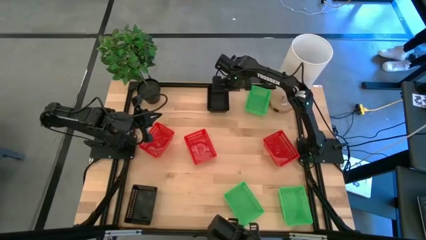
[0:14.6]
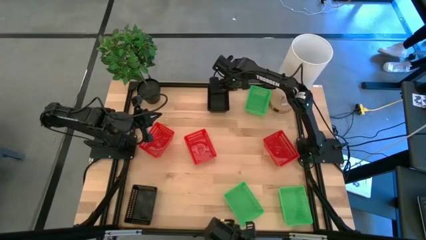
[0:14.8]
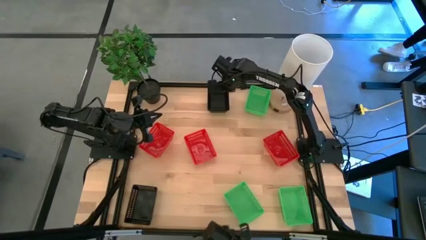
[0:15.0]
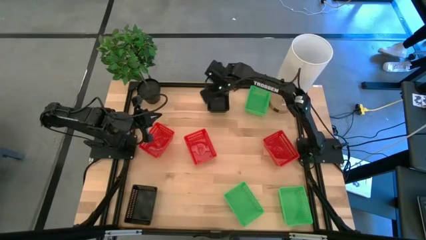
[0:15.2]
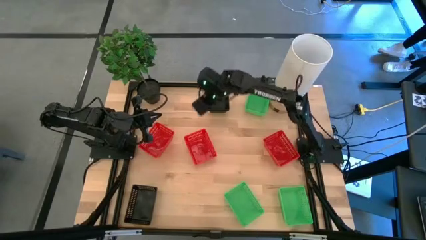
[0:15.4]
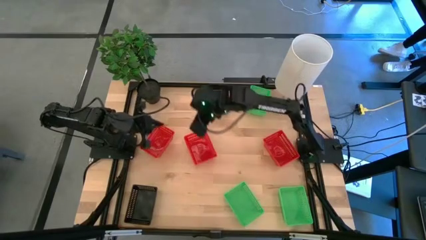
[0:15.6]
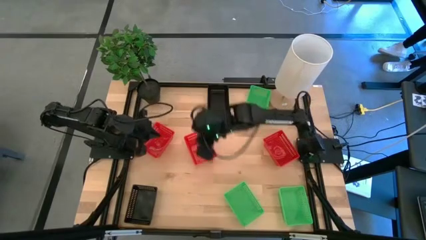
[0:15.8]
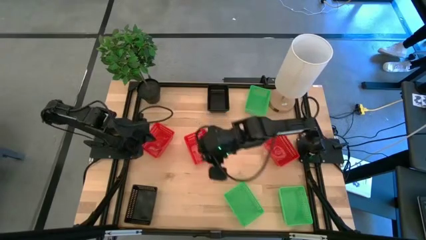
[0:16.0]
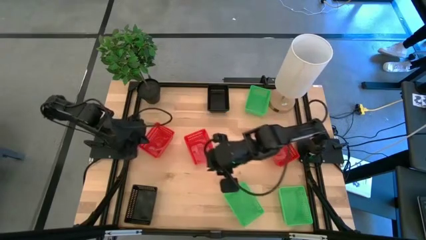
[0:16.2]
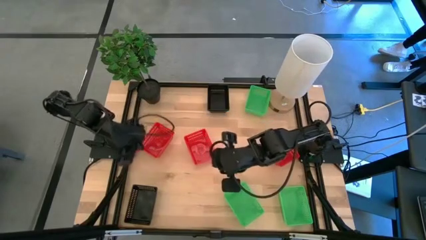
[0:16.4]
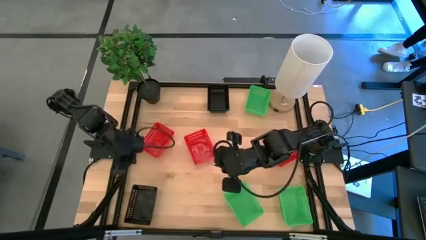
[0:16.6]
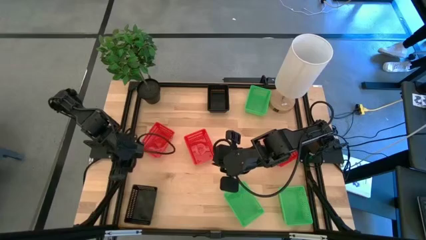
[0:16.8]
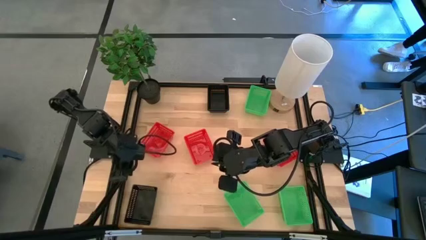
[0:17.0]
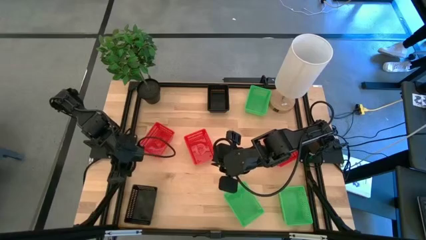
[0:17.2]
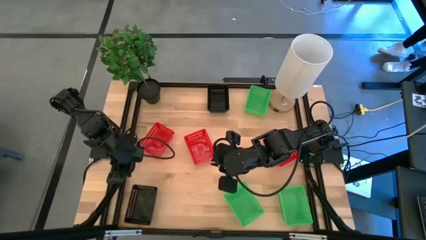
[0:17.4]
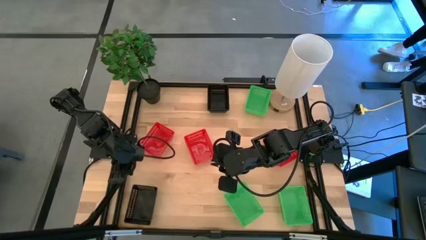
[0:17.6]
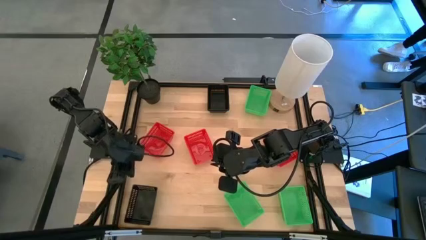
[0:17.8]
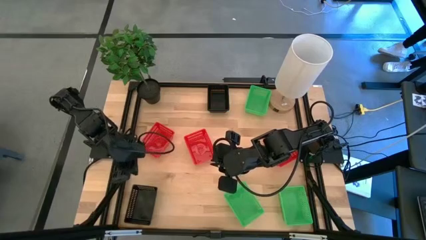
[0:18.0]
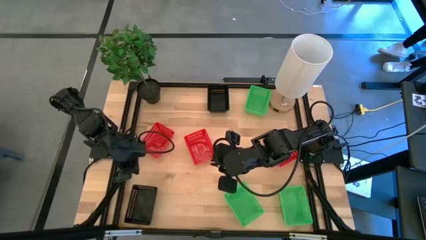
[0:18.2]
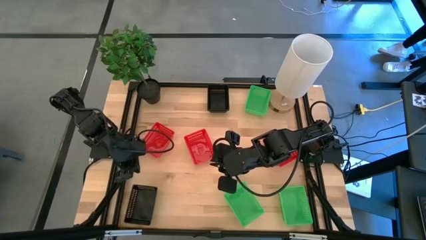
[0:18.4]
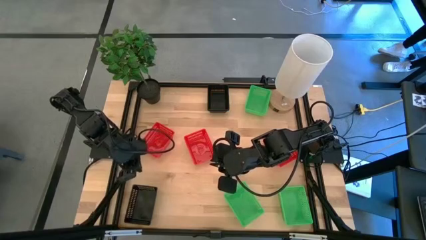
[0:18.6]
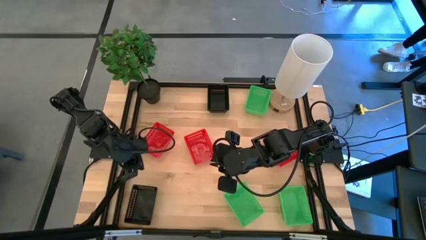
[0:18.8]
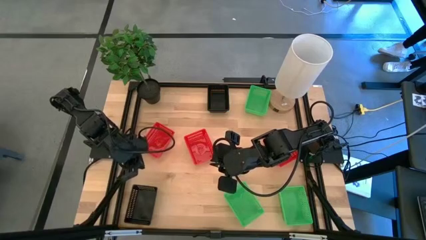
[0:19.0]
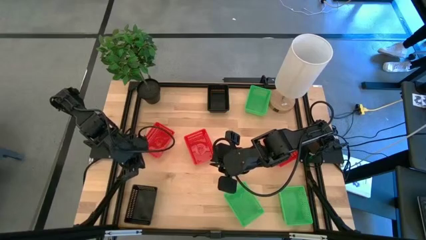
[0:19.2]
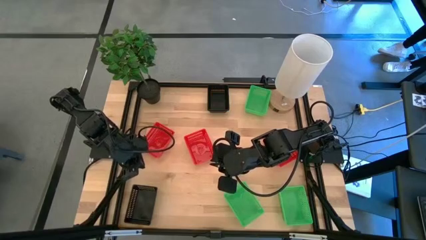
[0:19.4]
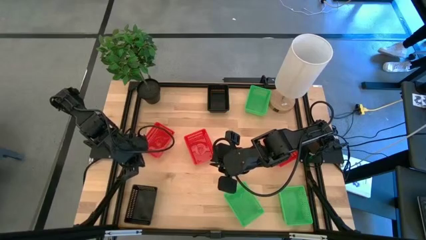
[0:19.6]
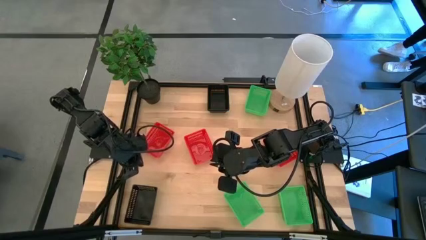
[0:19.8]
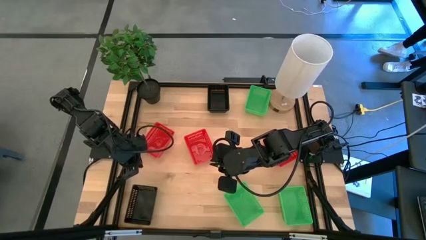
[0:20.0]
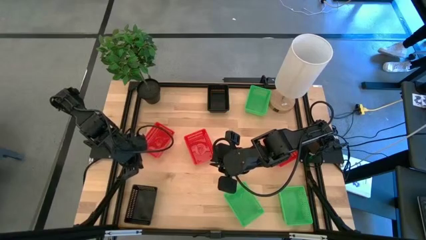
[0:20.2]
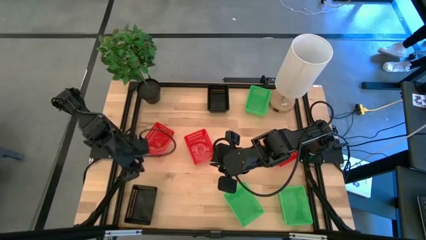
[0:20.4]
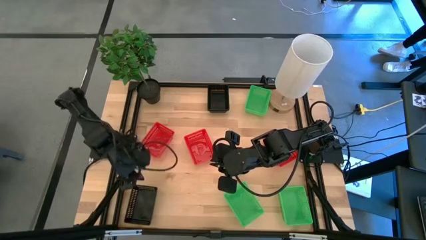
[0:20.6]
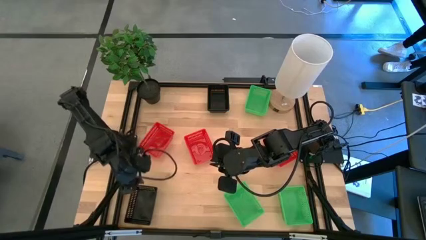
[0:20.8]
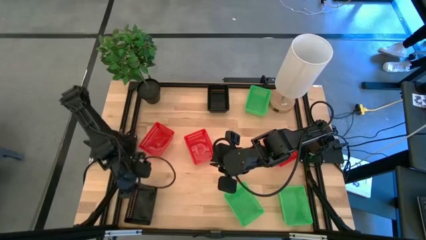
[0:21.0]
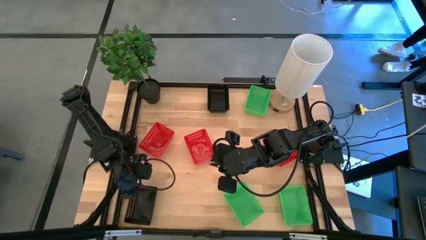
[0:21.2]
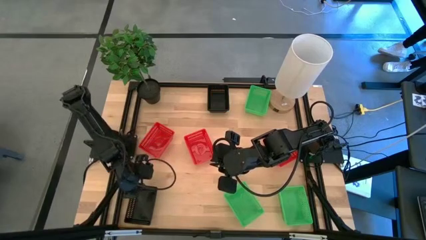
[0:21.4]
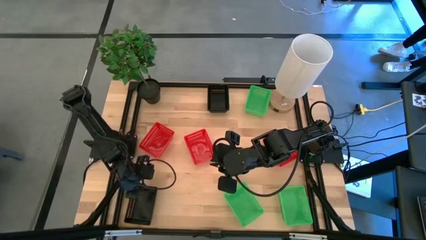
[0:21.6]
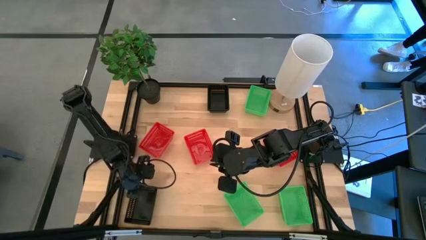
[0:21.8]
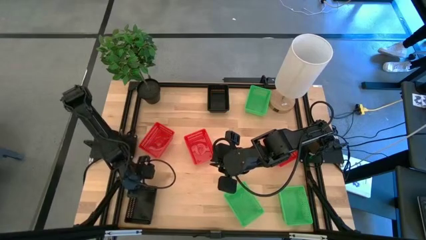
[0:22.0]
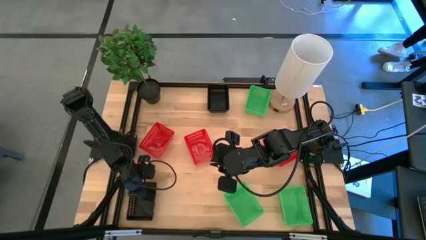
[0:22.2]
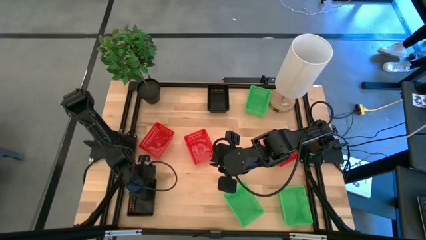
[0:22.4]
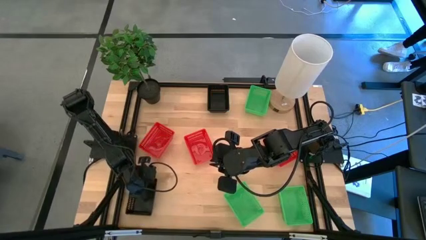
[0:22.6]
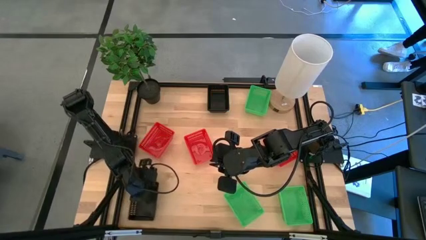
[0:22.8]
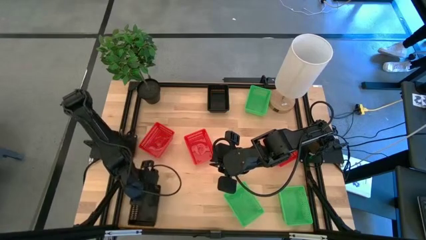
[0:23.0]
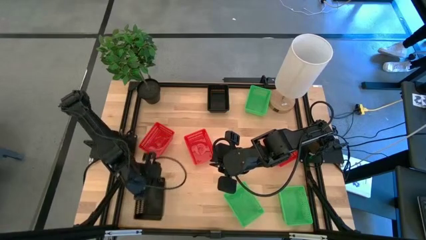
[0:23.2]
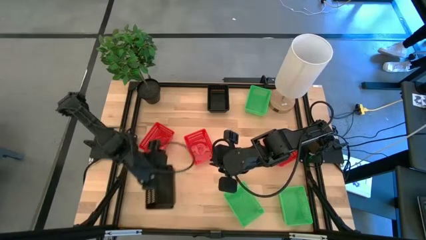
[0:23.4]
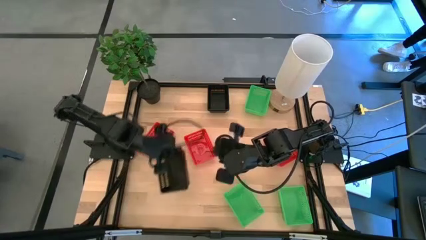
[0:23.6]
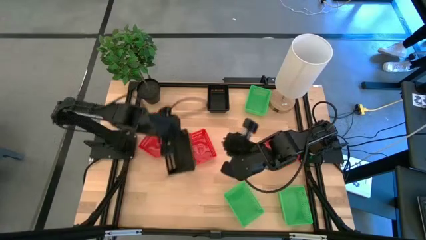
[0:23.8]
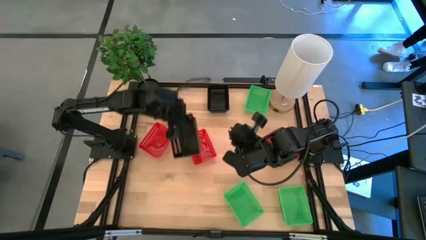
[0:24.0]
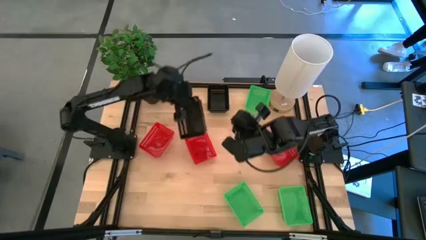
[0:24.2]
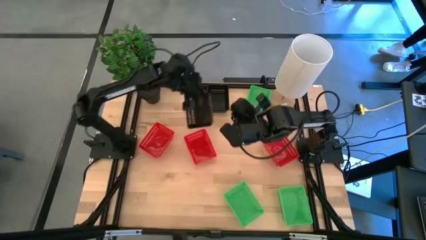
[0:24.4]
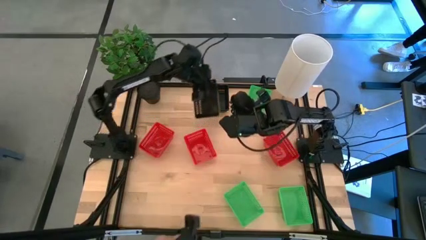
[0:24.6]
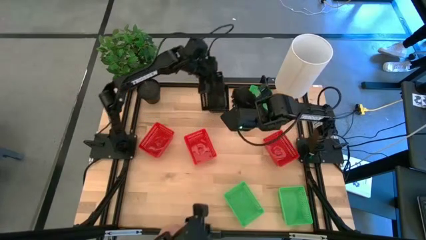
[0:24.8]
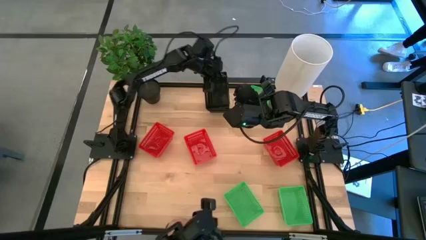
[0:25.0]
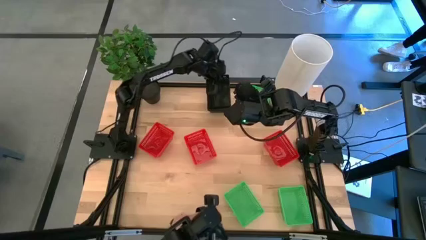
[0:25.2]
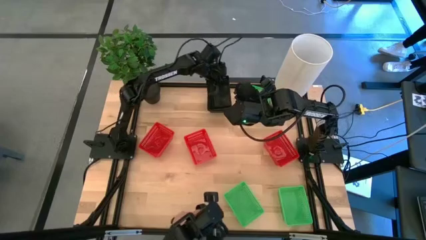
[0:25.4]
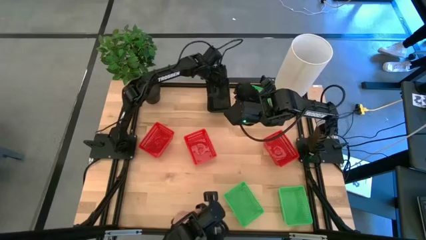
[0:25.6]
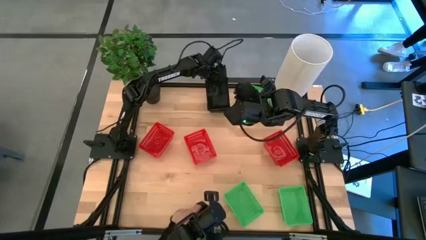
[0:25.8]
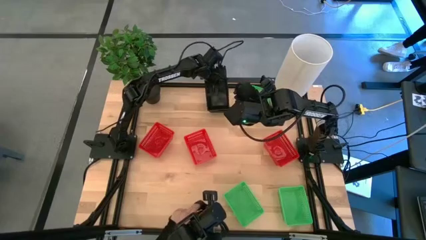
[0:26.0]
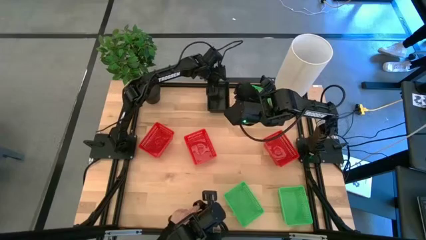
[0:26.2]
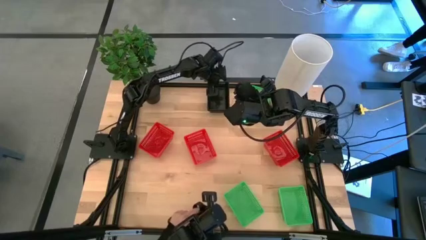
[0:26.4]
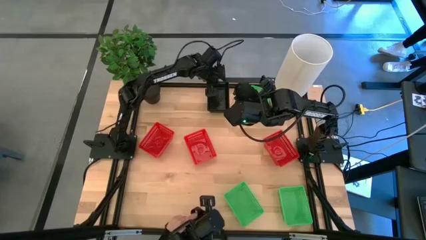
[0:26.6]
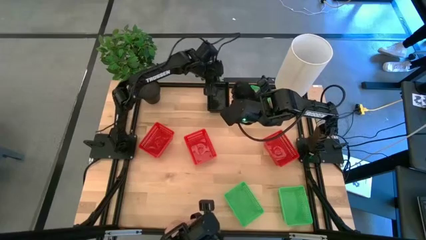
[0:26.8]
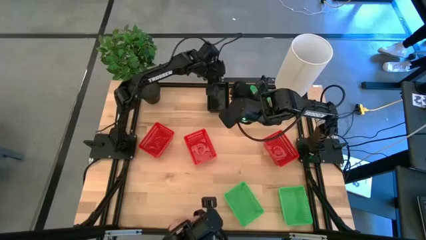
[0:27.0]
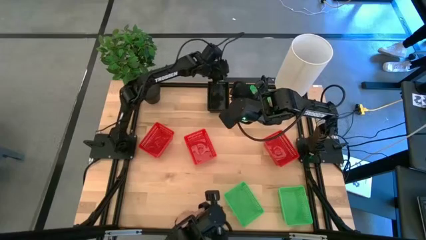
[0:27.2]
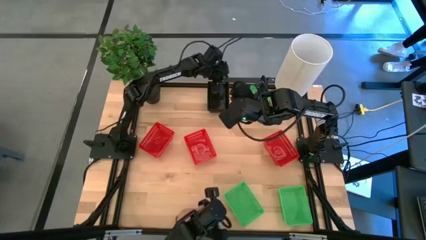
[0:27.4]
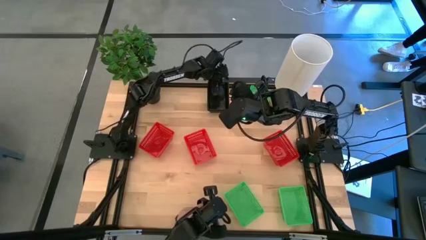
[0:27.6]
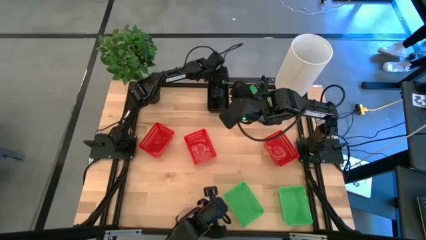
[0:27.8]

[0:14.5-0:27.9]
Stack the bottom black bin on the top black bins
